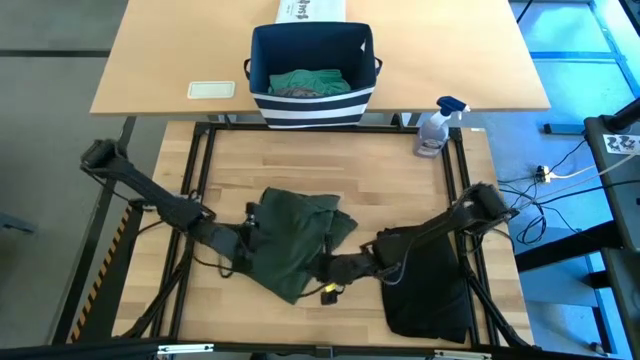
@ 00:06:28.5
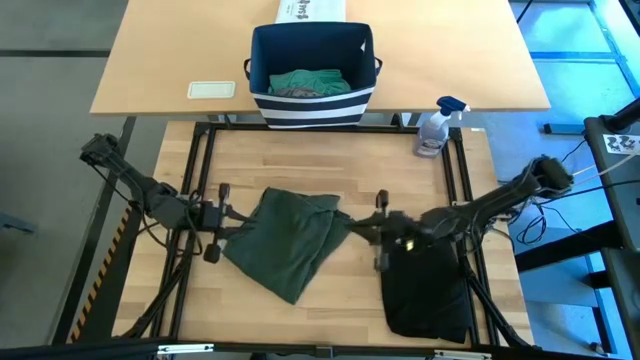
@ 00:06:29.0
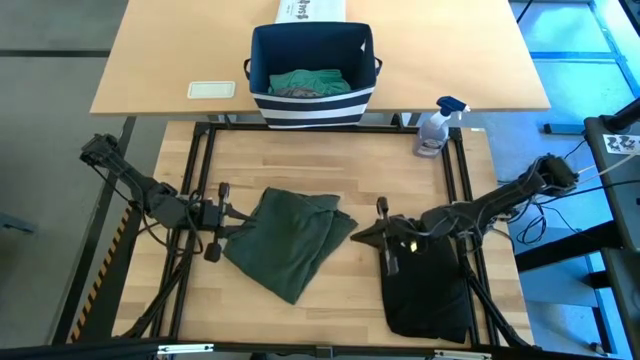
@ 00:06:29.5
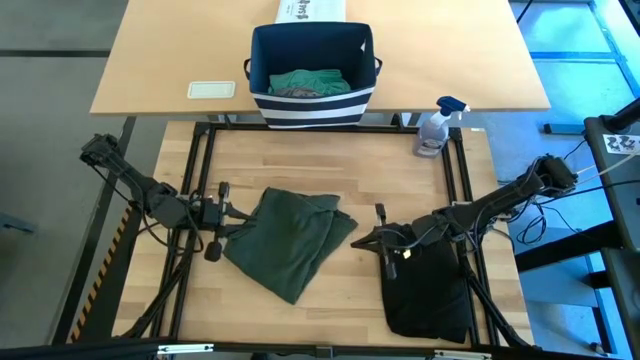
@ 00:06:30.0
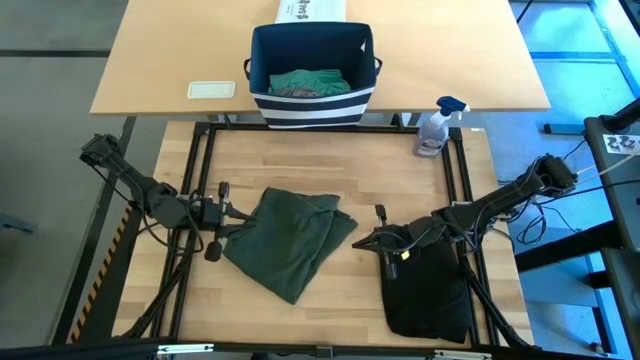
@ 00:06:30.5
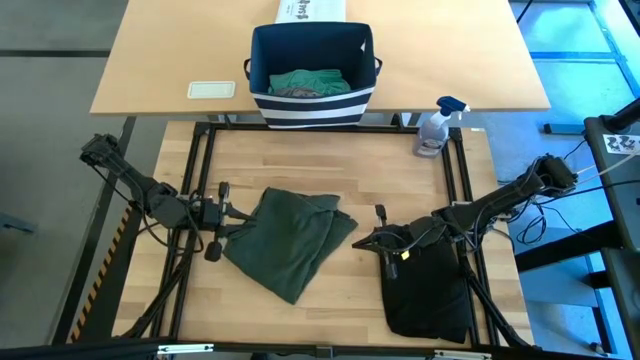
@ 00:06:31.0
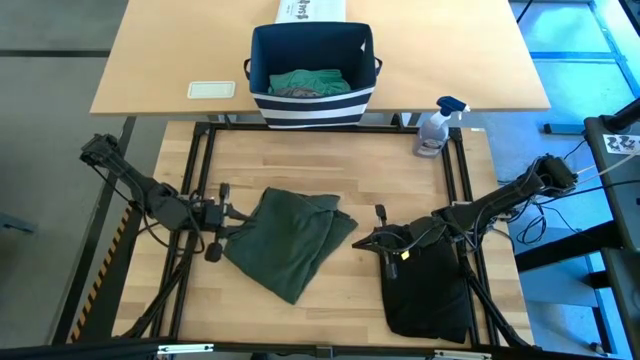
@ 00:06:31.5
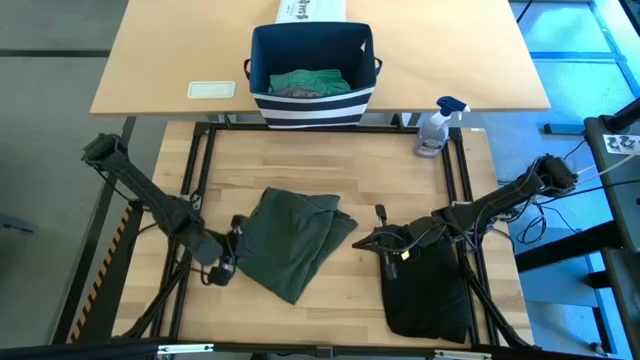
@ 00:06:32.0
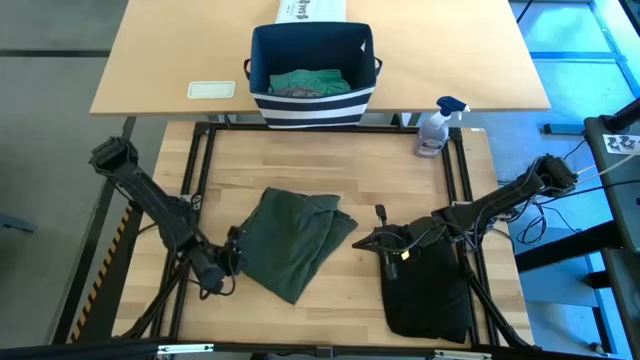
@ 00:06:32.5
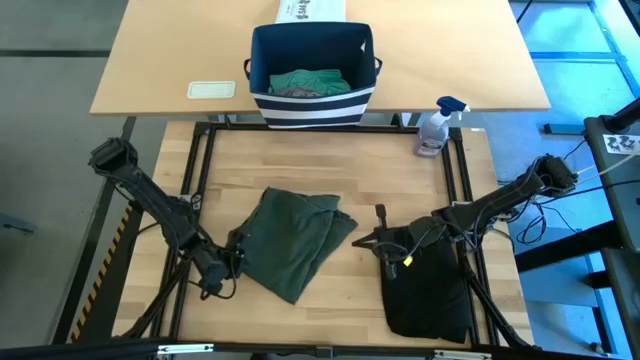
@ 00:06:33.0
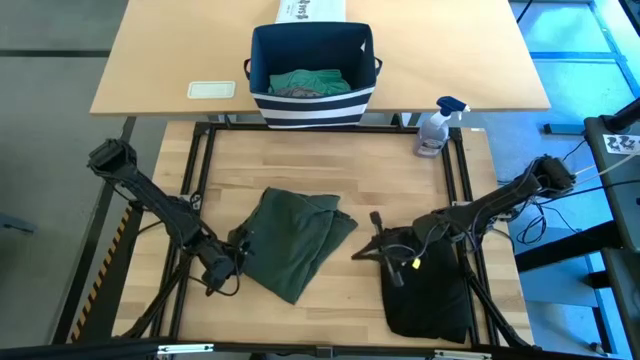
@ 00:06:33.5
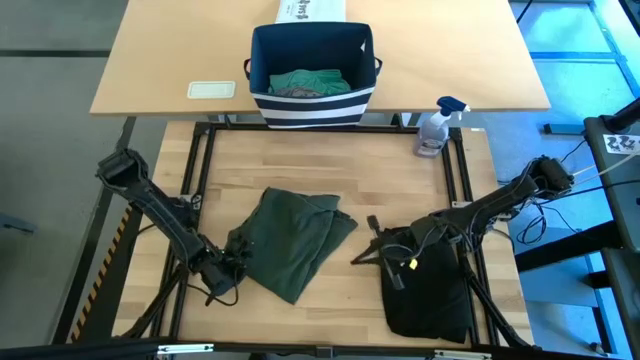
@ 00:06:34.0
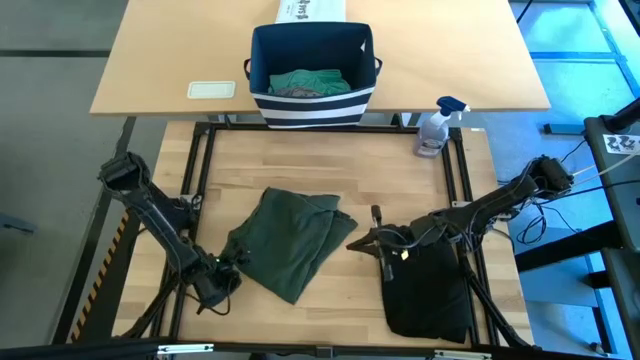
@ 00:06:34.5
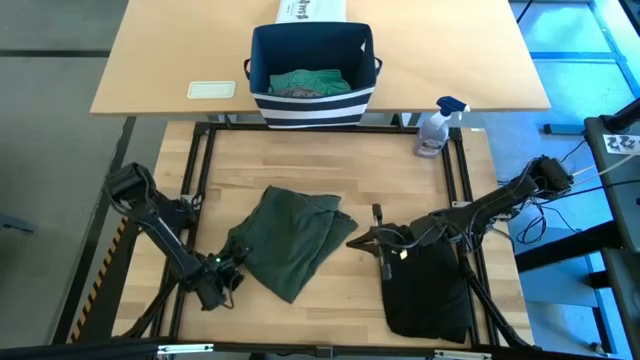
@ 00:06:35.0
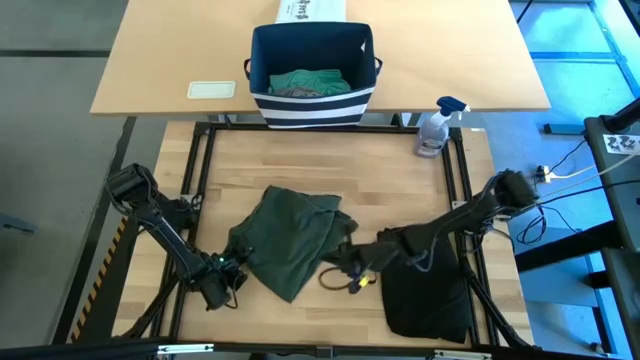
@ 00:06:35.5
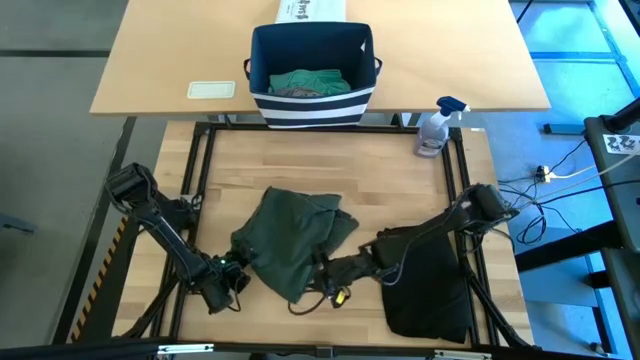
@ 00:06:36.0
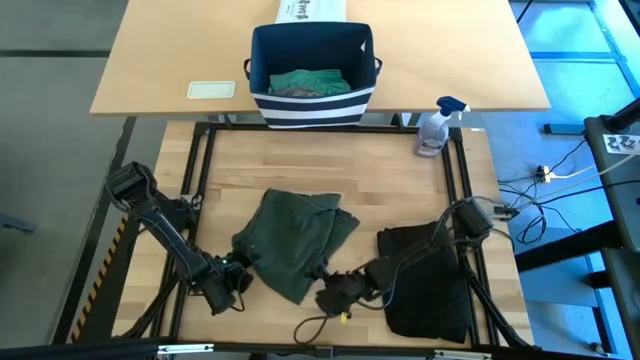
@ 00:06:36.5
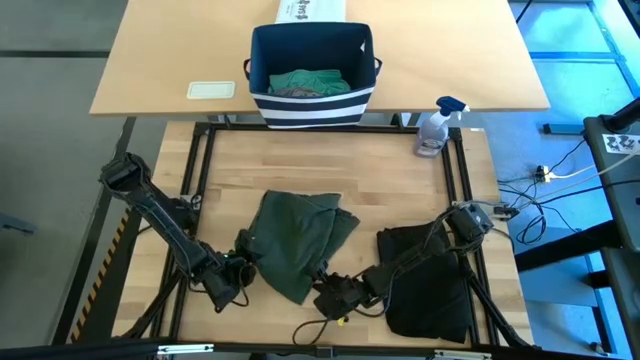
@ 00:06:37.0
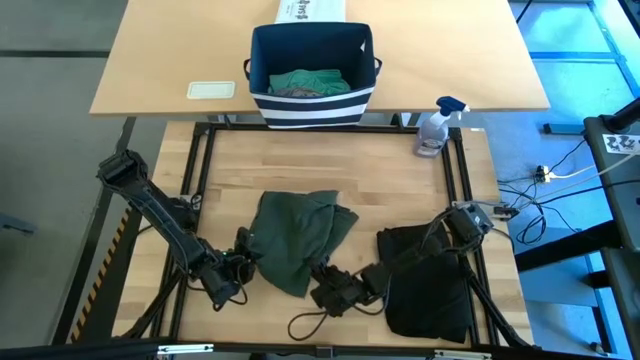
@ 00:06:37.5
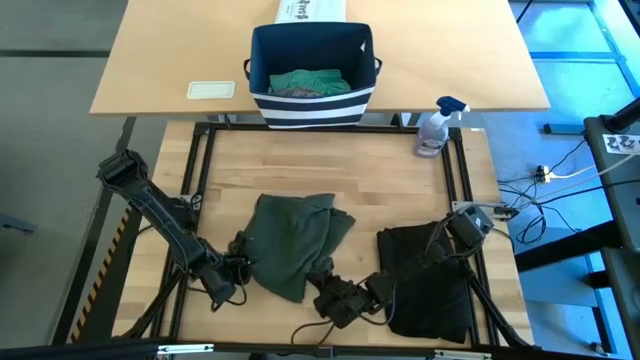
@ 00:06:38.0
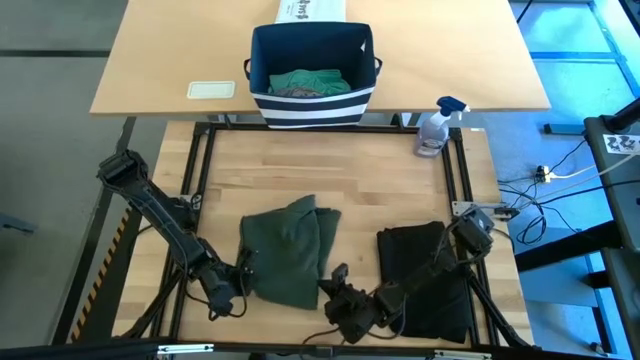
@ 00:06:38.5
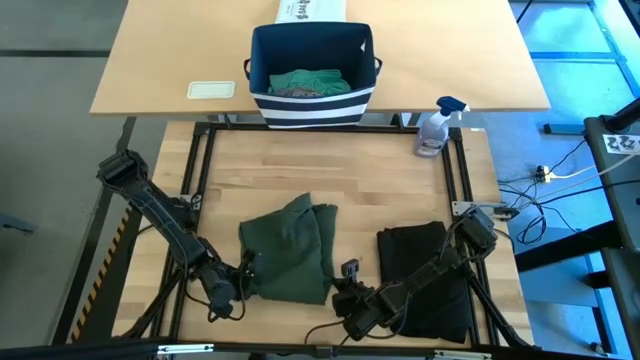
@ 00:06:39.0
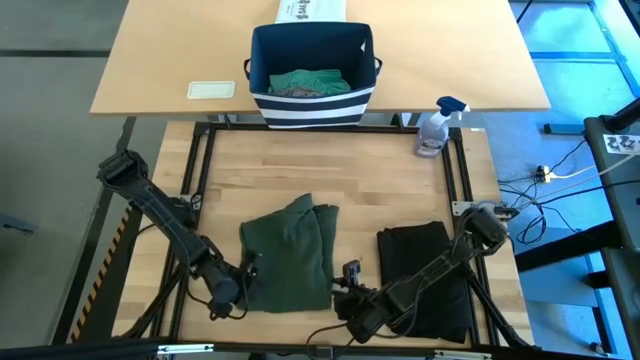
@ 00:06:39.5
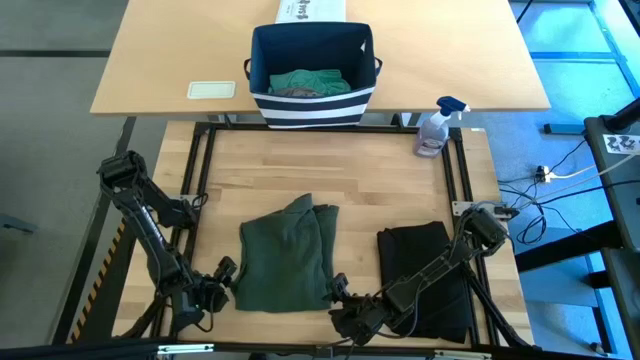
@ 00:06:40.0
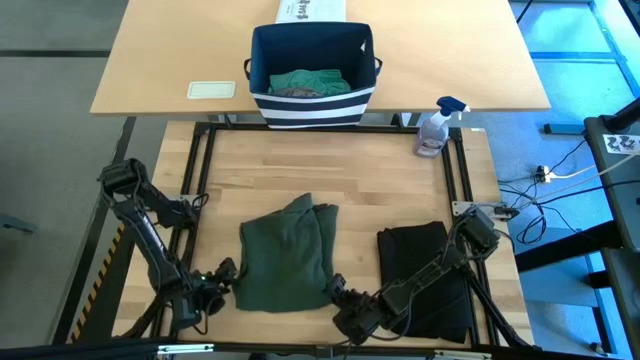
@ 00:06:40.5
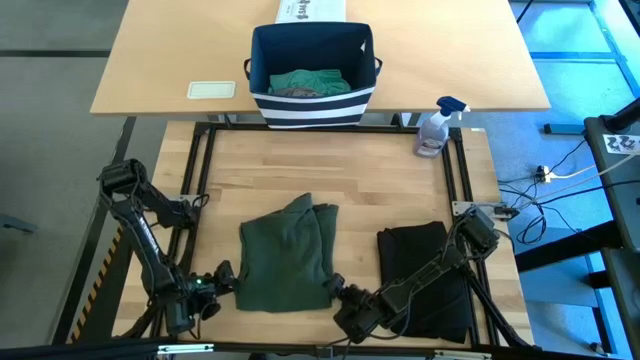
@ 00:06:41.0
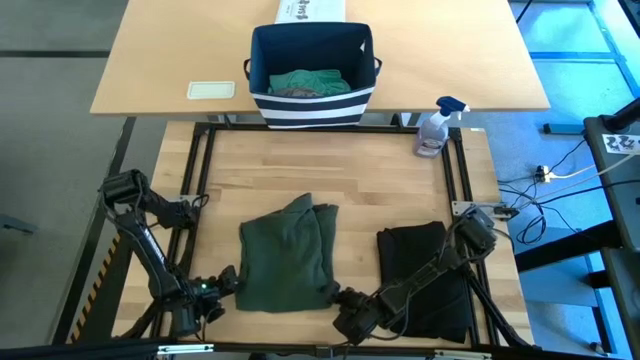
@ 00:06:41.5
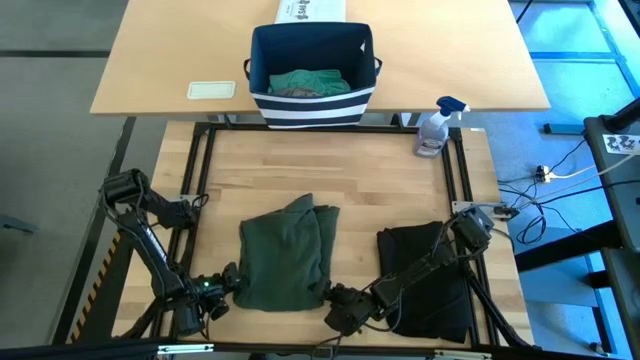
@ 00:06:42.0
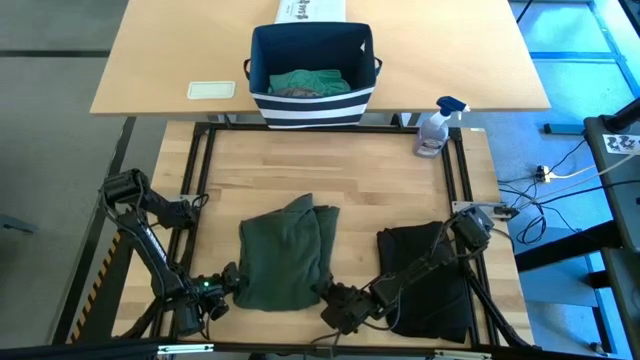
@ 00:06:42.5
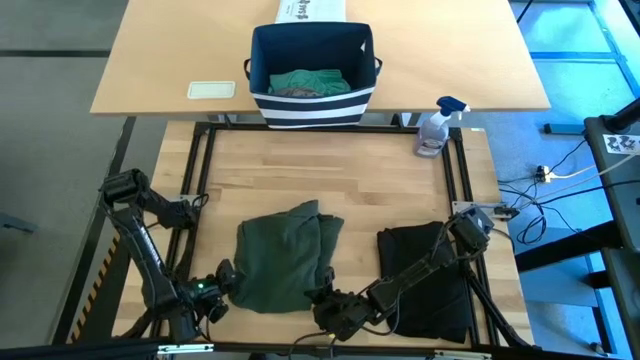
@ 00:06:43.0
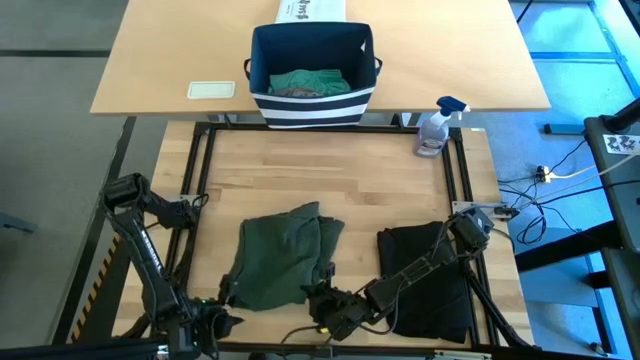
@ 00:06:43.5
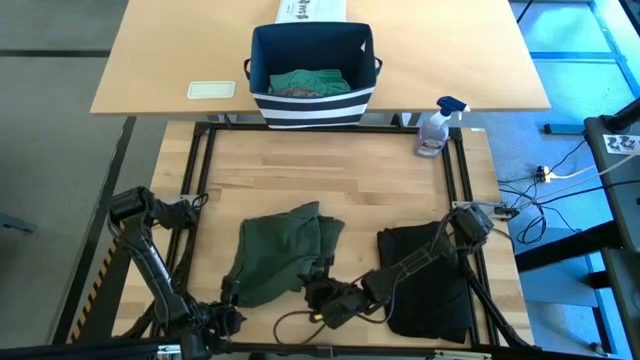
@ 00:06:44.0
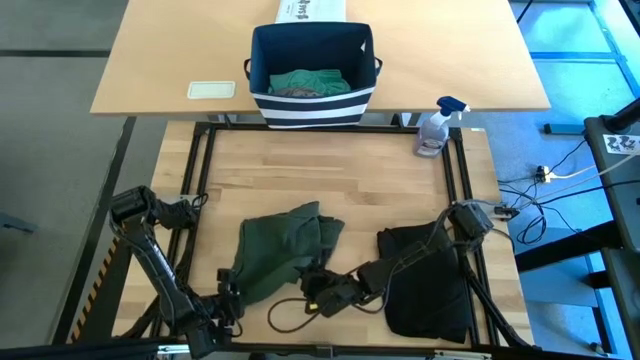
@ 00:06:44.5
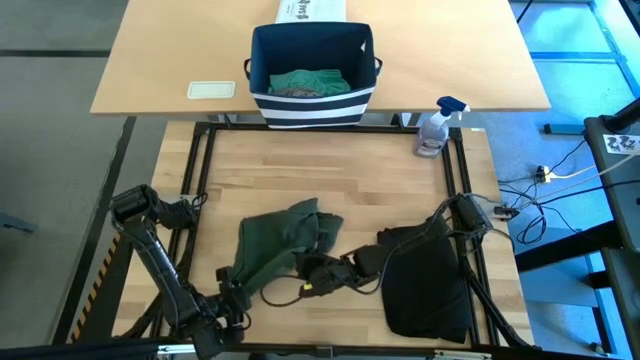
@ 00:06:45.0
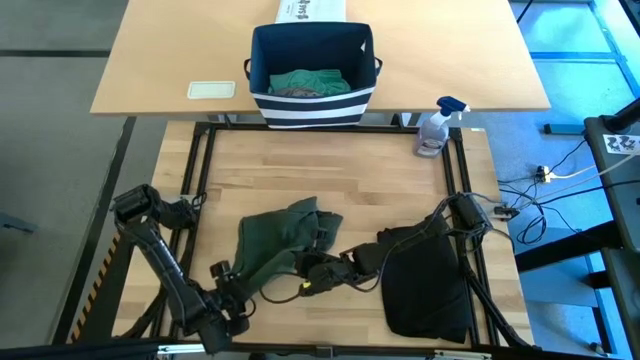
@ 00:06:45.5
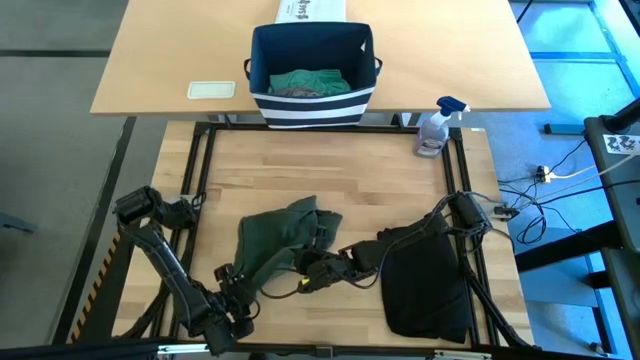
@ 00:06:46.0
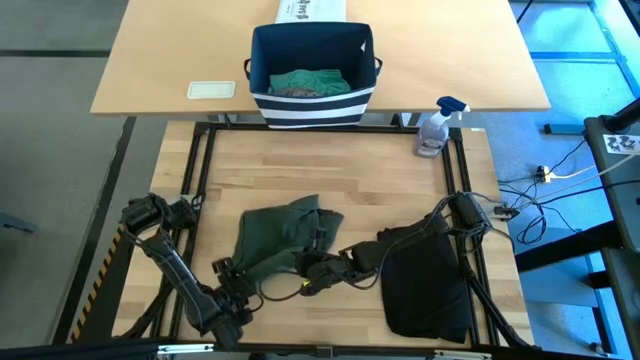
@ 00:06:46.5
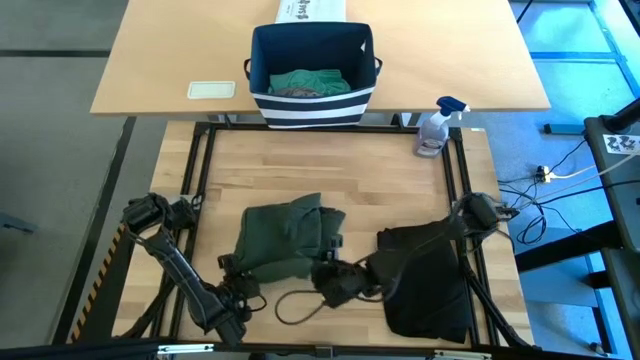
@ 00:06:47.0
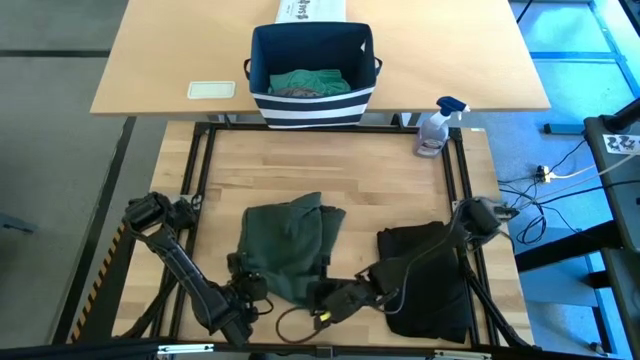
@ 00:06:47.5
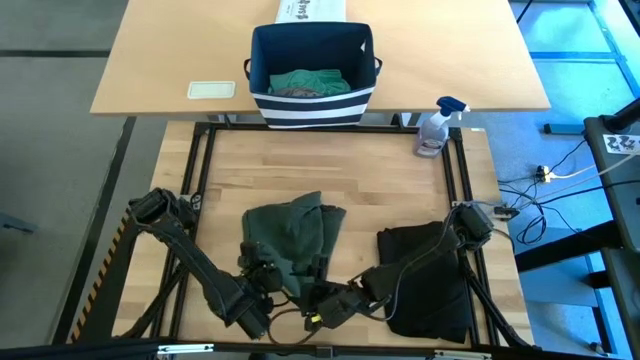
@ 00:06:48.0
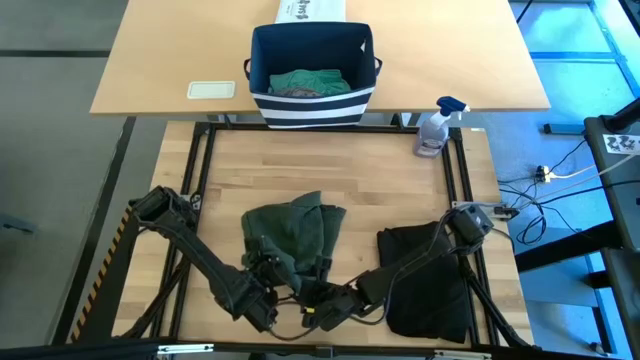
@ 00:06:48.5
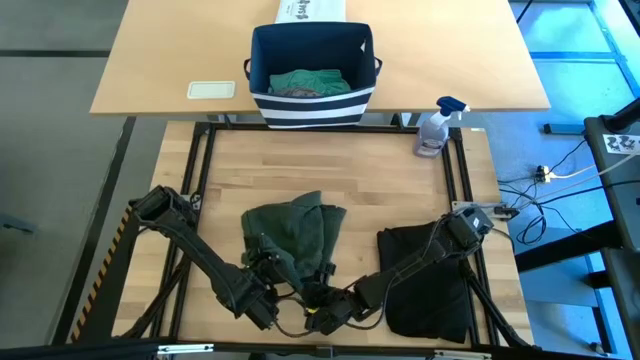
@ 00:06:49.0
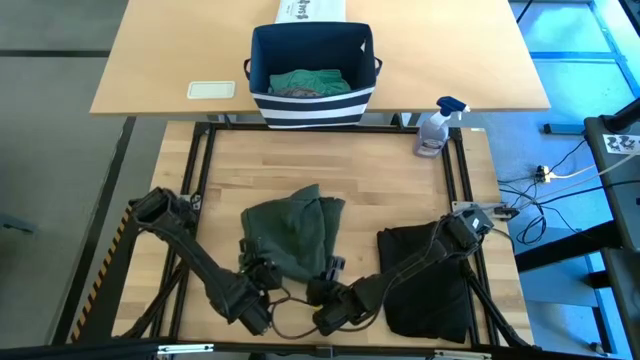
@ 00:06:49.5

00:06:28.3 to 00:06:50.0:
Task: Fold Laundry from Bin
Stack the folded green polo shirt on top of the folded black shirt
